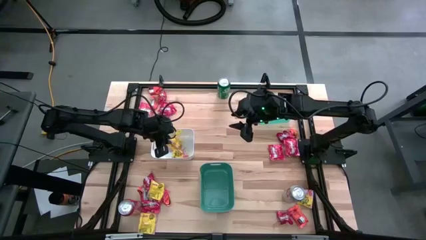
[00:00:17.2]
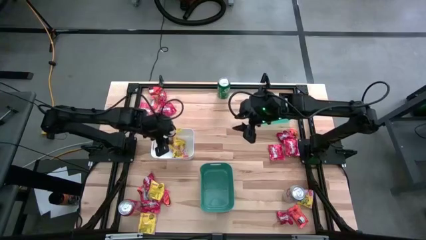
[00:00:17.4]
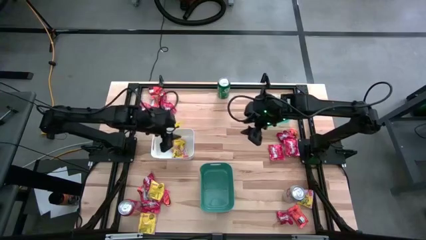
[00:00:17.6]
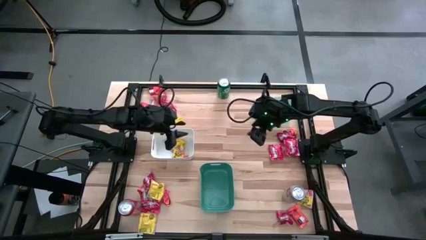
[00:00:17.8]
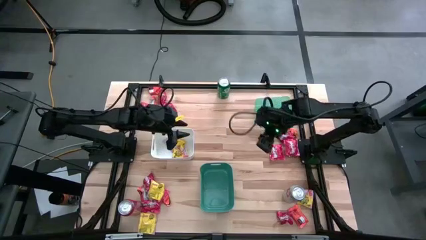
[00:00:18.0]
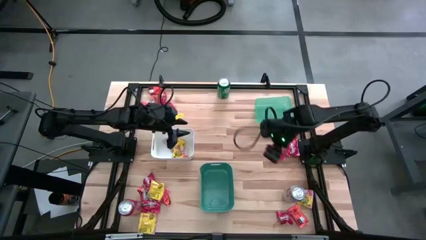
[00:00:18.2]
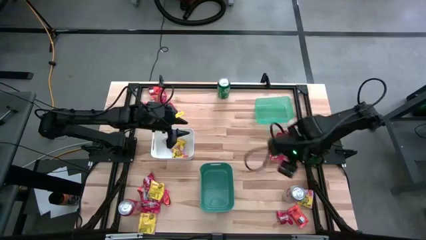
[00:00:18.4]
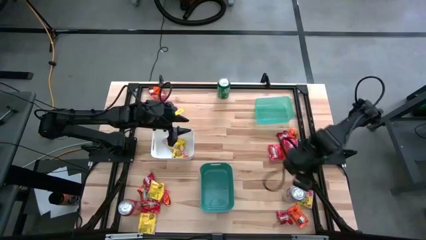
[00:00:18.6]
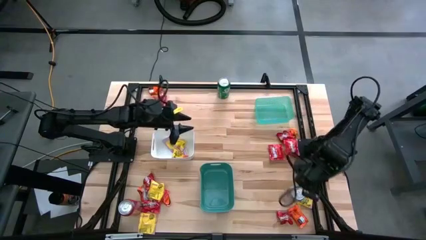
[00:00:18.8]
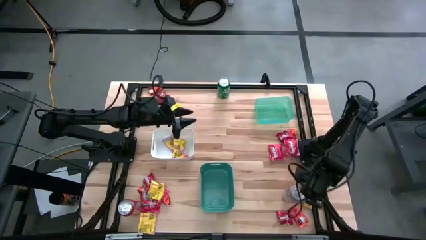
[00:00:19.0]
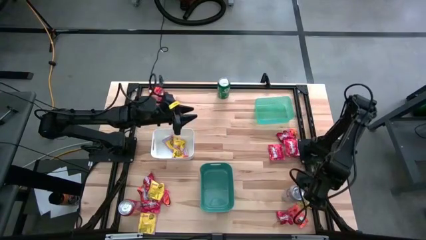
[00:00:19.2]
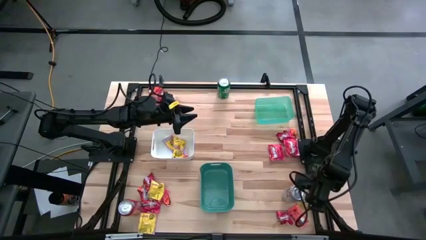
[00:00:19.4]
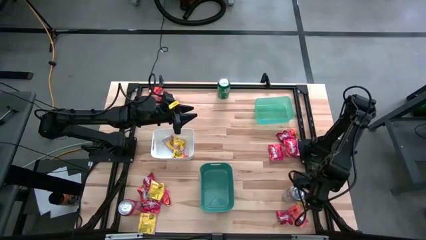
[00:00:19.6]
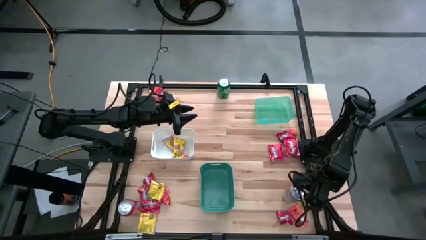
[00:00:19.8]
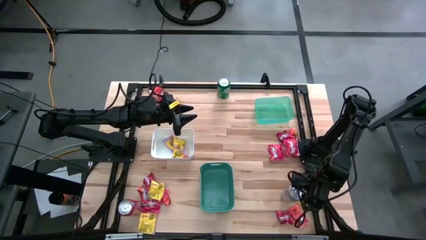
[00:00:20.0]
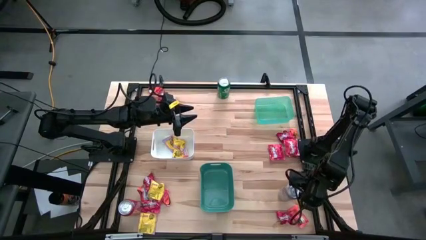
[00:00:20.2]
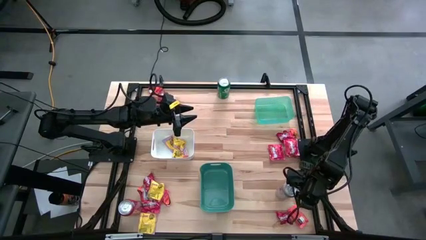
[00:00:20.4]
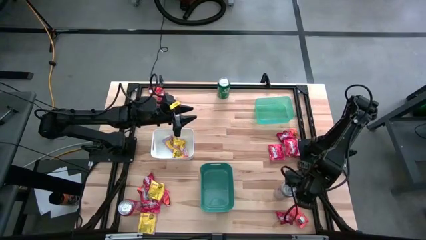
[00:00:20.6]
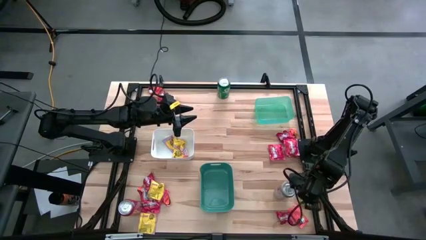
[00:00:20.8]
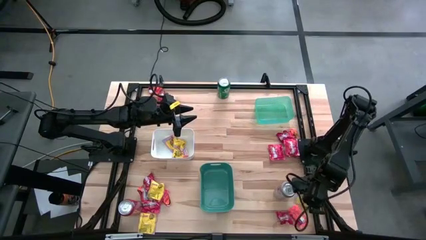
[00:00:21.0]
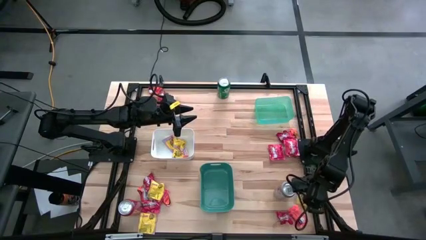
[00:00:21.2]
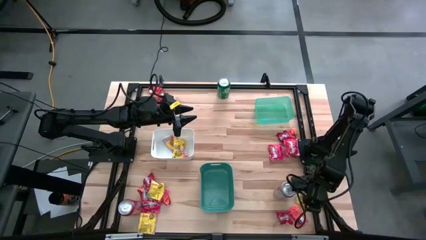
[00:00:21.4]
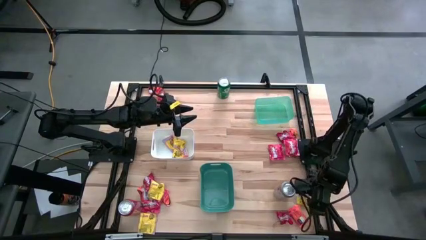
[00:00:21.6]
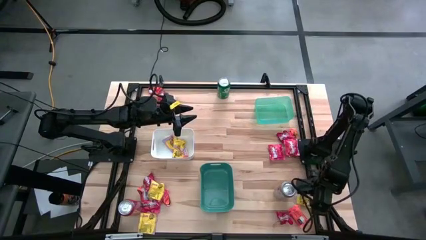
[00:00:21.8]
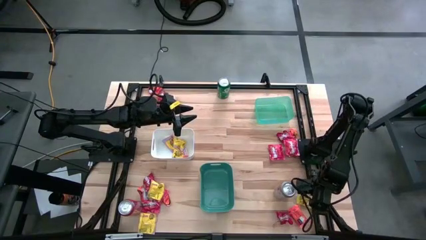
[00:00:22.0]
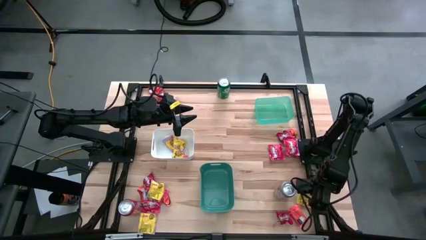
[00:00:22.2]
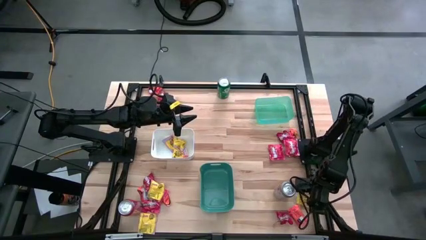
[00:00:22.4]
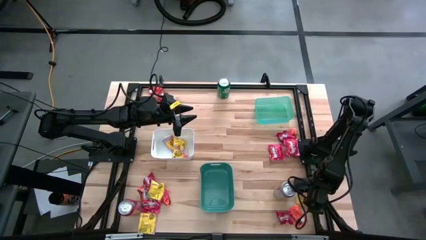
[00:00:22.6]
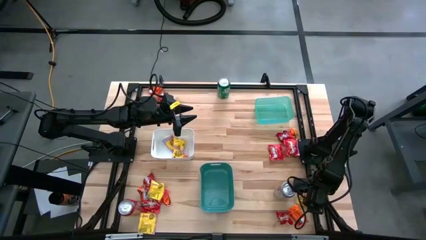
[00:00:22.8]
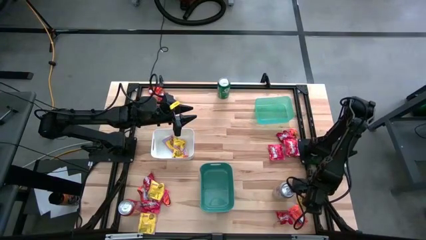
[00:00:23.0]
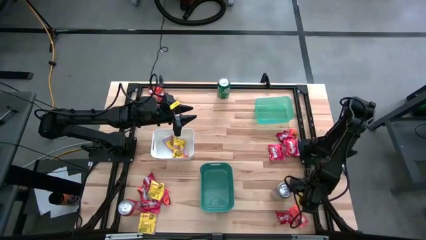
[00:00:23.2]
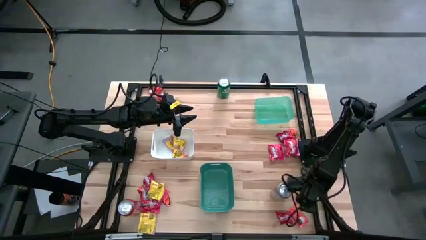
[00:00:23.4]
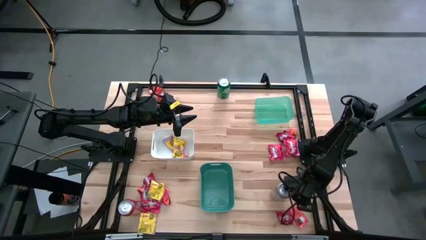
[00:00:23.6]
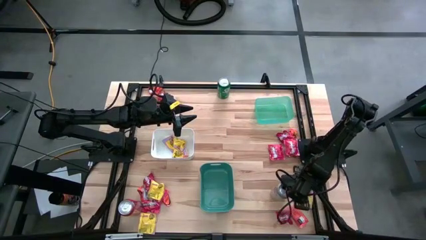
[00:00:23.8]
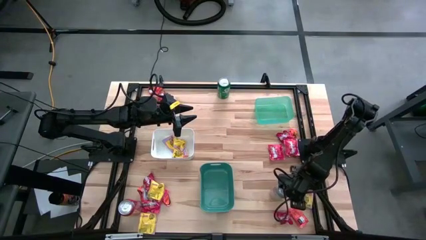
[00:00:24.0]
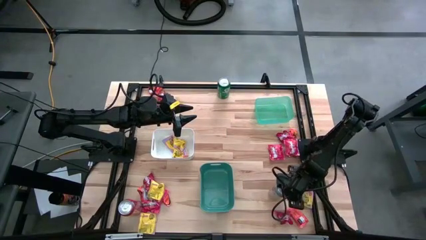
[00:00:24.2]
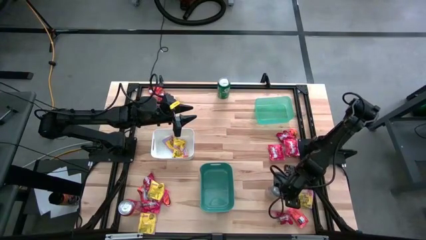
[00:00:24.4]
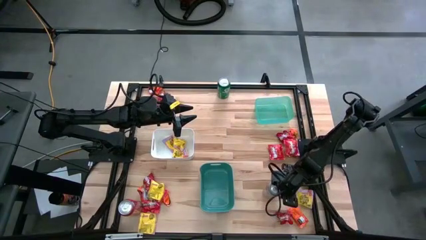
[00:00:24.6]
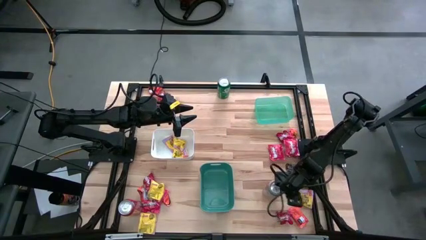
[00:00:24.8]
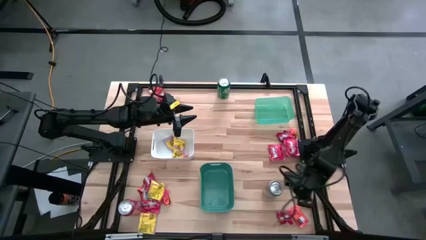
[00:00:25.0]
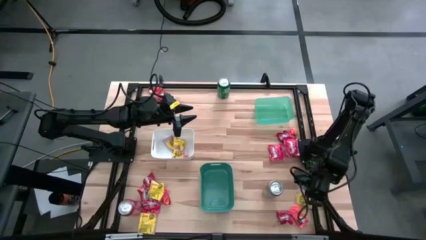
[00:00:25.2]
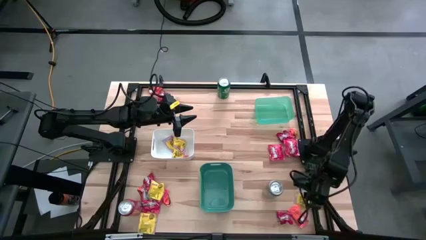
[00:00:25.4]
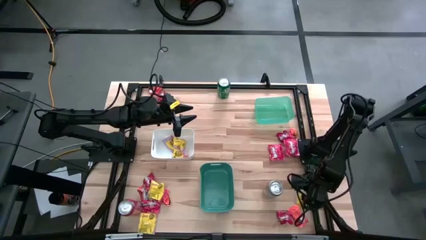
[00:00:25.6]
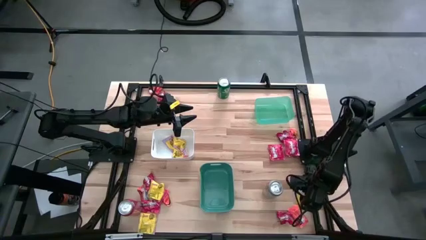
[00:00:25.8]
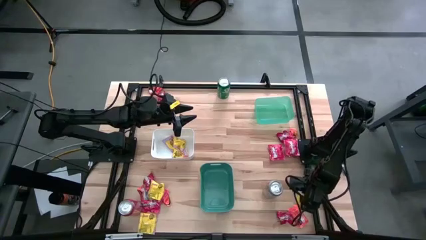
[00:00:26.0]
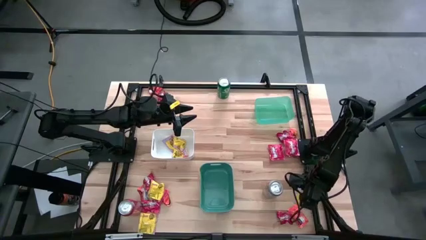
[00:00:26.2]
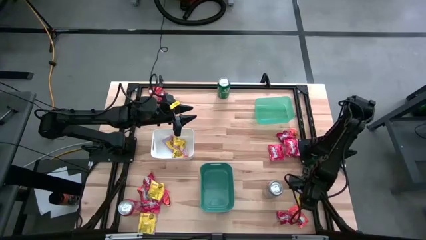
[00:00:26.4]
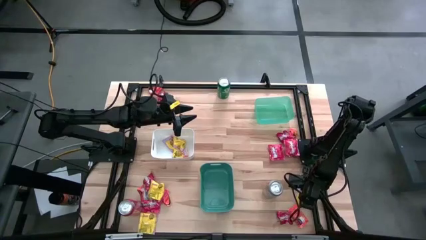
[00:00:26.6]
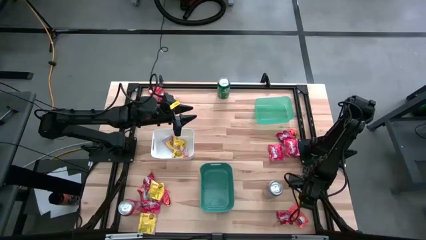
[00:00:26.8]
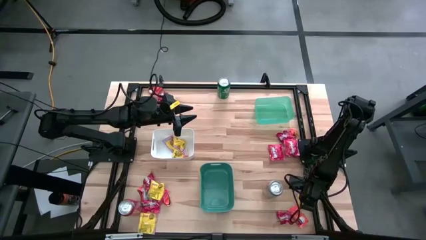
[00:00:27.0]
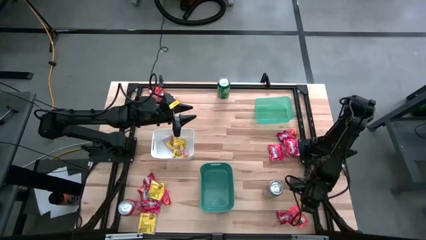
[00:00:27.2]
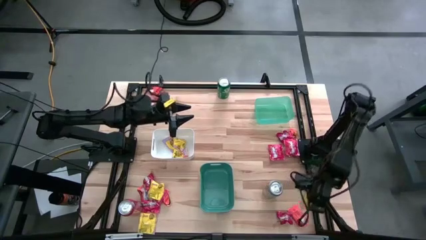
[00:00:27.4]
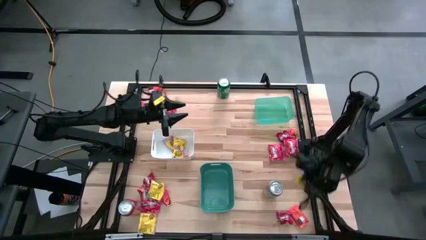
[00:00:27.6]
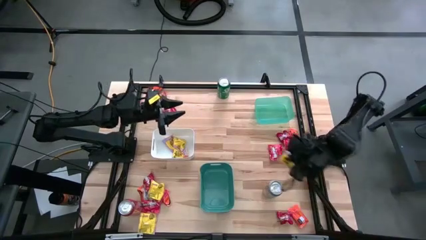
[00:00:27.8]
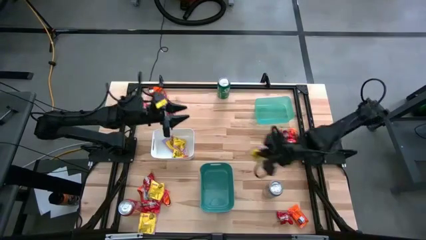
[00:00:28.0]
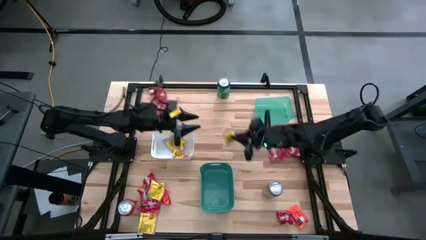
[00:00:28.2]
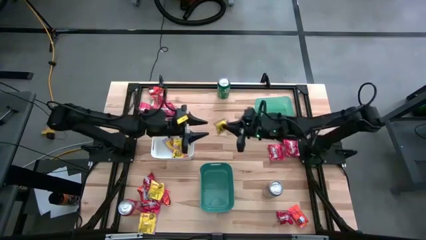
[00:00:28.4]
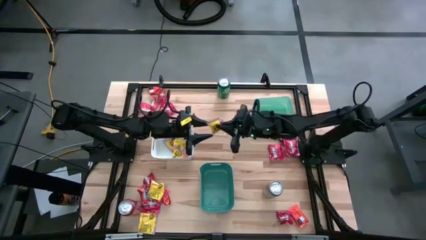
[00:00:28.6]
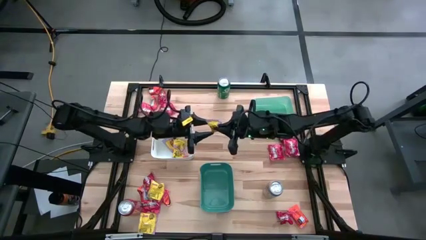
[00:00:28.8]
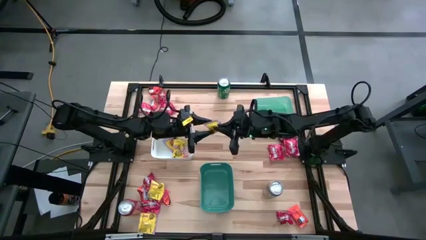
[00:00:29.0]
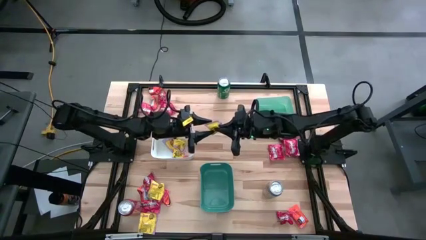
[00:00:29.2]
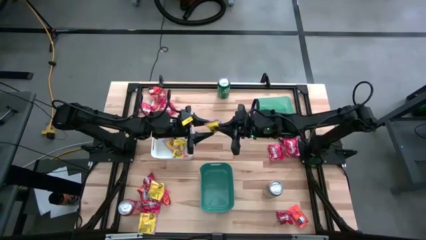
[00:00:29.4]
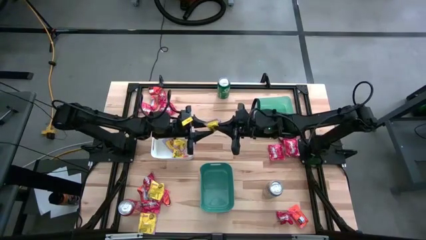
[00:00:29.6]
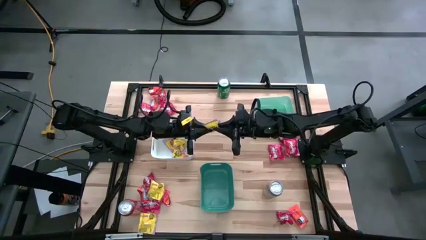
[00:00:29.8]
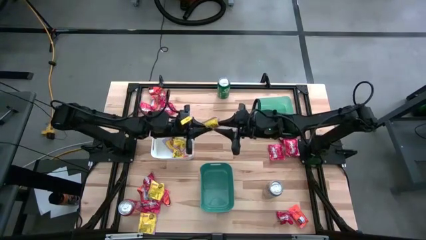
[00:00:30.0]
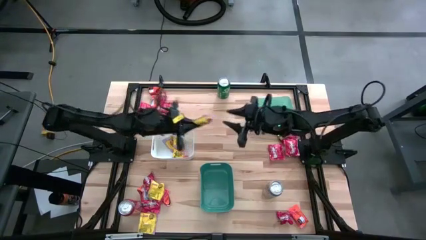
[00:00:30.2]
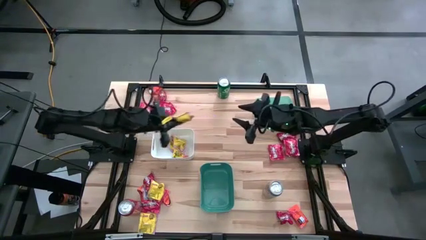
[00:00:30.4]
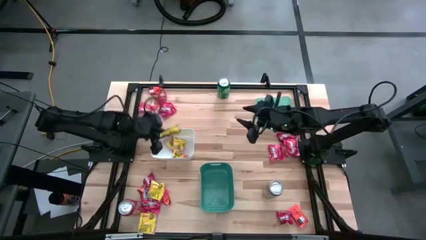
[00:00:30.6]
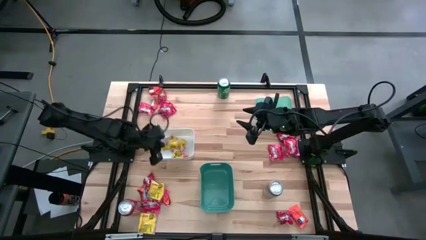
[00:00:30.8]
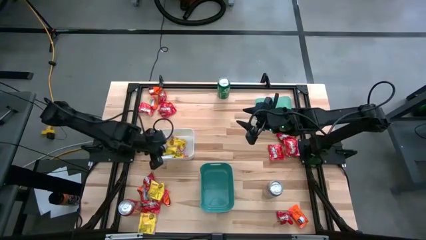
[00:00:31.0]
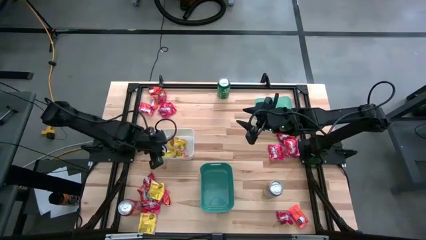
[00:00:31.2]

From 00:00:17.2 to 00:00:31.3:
Task: Sort candy
Put the yellow candy pack into the white bin

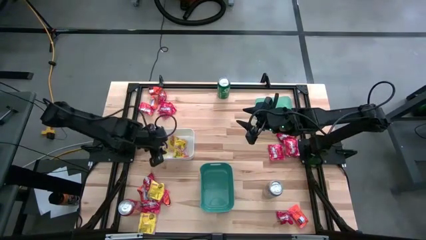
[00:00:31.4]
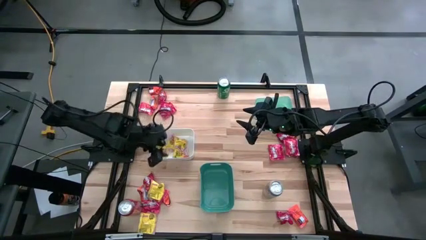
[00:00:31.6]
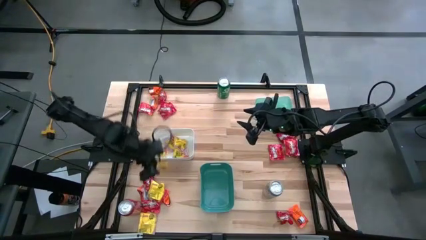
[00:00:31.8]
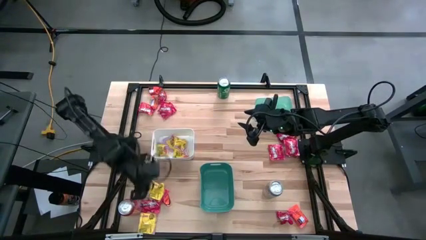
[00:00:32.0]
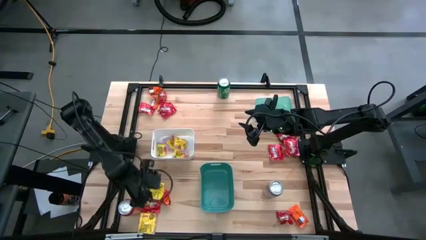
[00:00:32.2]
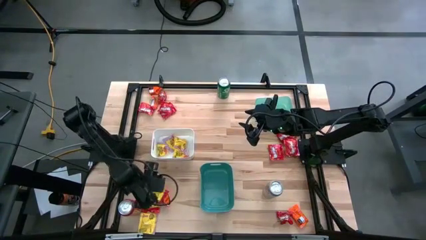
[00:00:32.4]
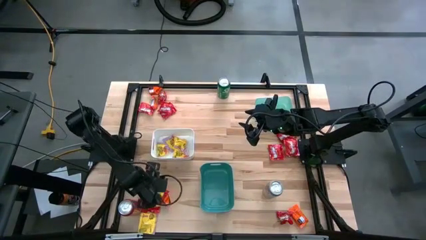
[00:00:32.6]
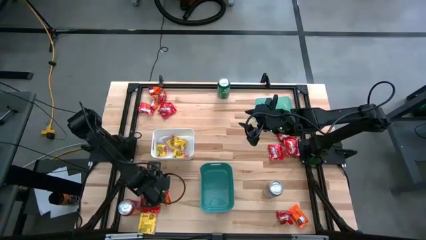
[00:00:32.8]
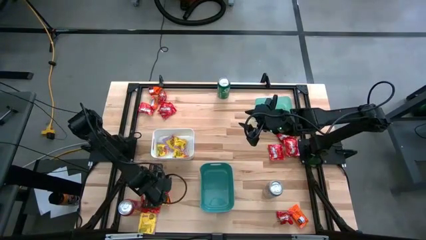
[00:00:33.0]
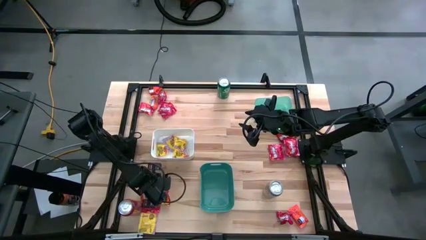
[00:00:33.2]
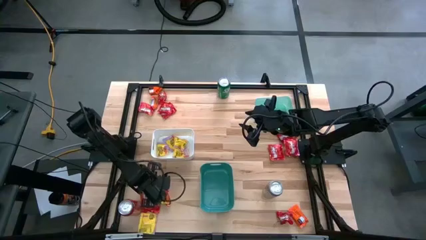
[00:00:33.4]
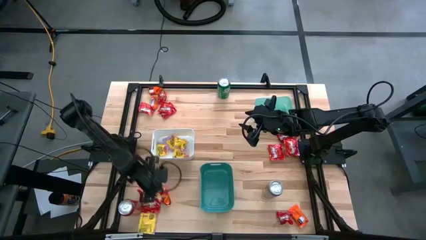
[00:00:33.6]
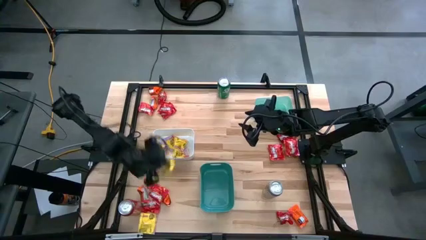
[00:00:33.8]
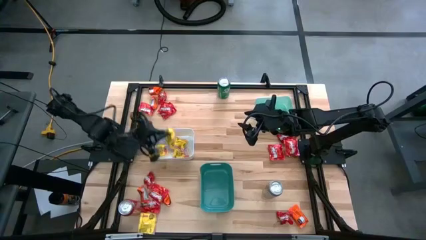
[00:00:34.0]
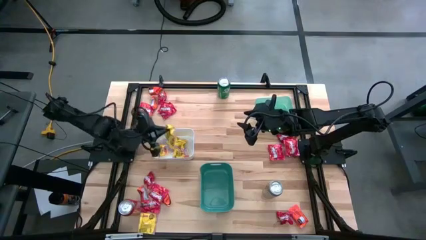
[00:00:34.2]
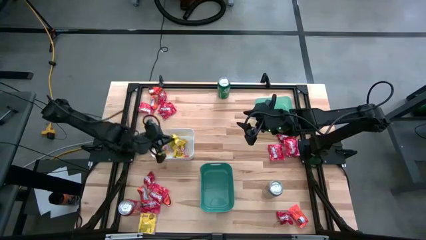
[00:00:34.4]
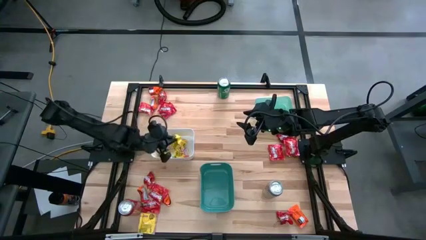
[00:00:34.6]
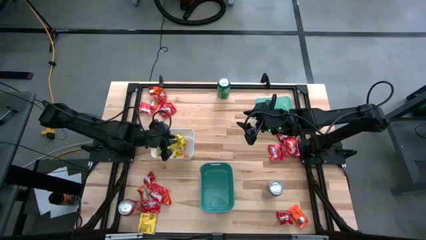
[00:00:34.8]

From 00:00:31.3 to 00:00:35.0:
Put the yellow candy pack into the white bin
